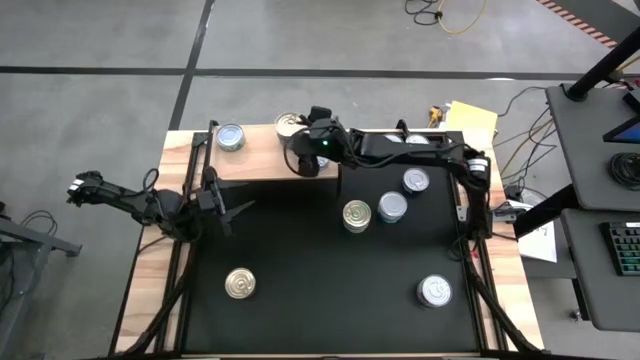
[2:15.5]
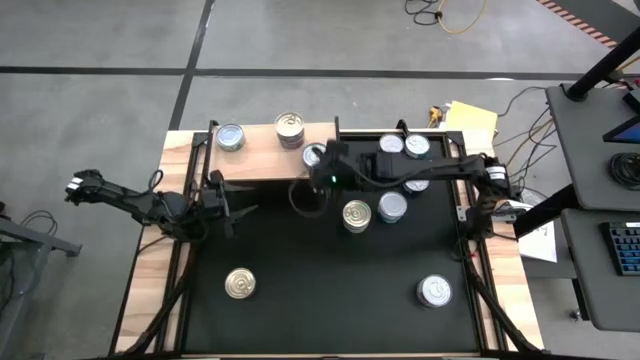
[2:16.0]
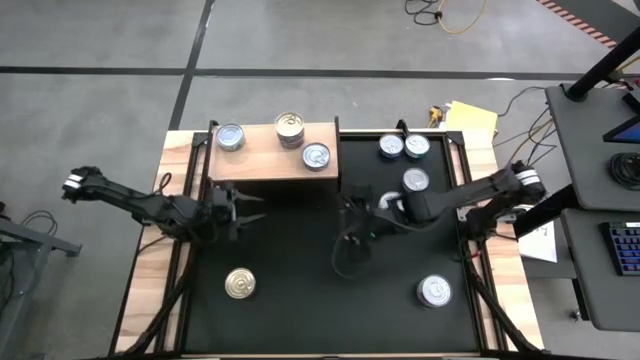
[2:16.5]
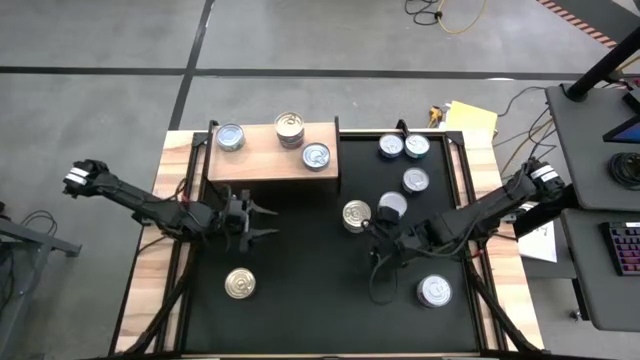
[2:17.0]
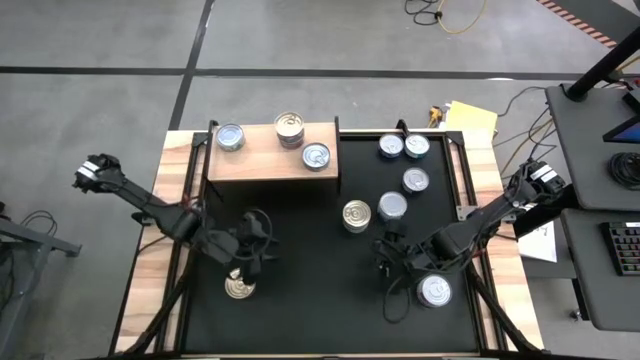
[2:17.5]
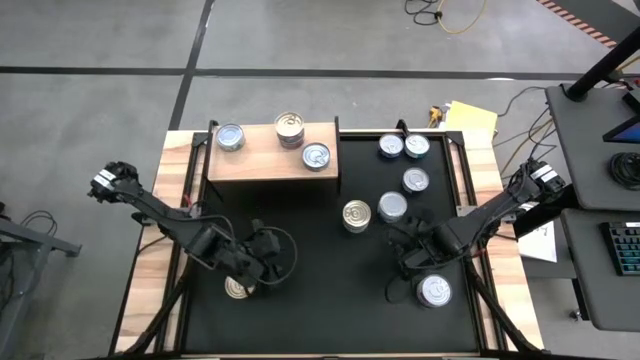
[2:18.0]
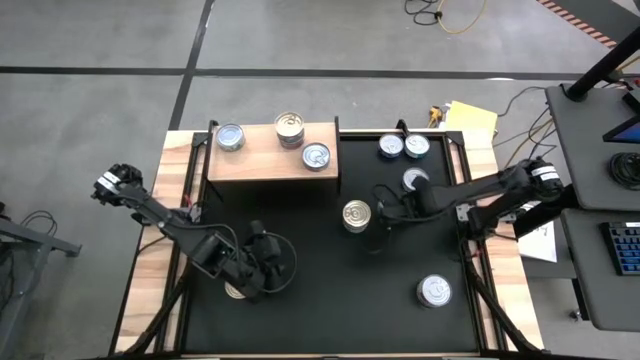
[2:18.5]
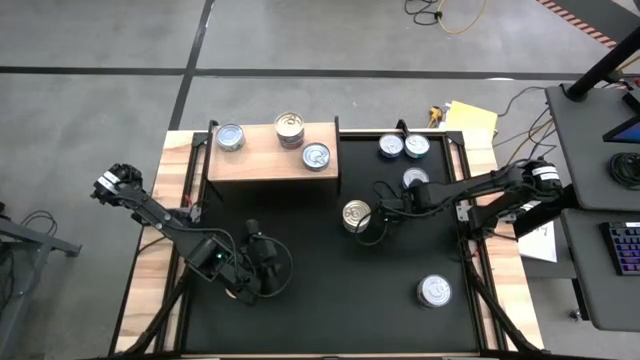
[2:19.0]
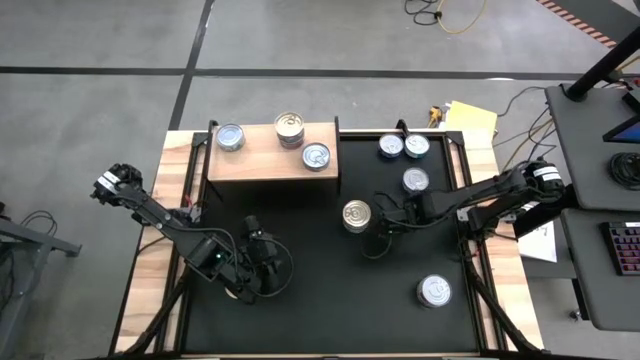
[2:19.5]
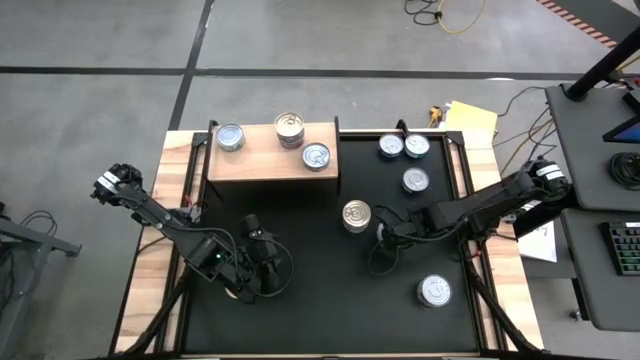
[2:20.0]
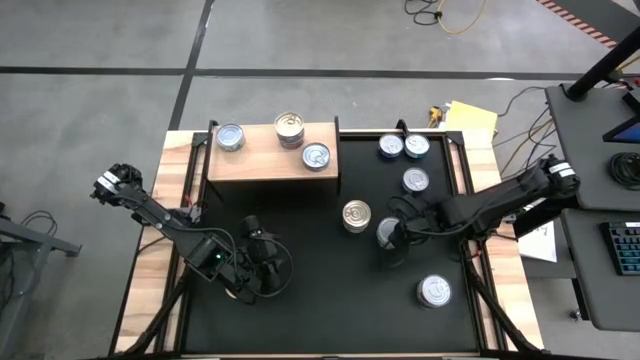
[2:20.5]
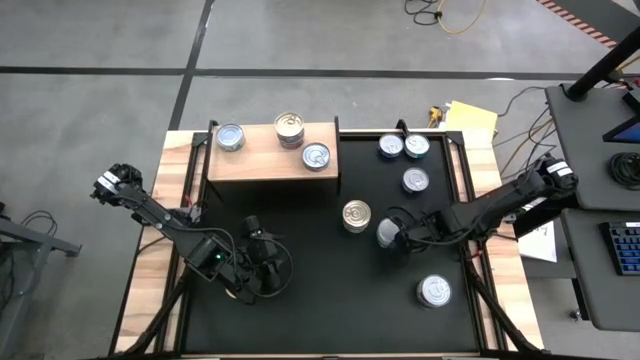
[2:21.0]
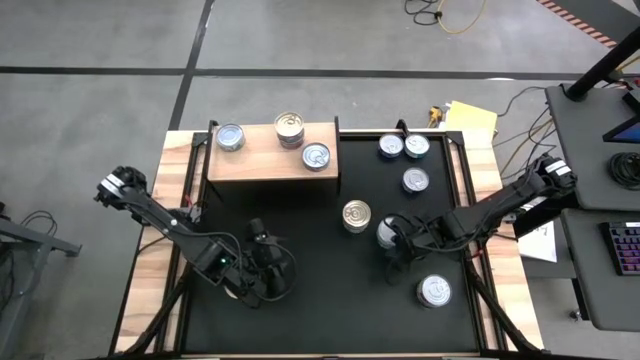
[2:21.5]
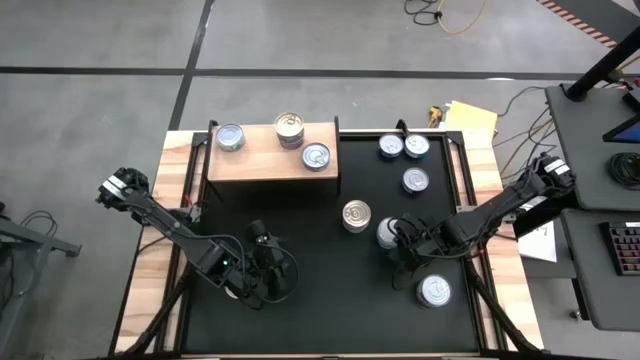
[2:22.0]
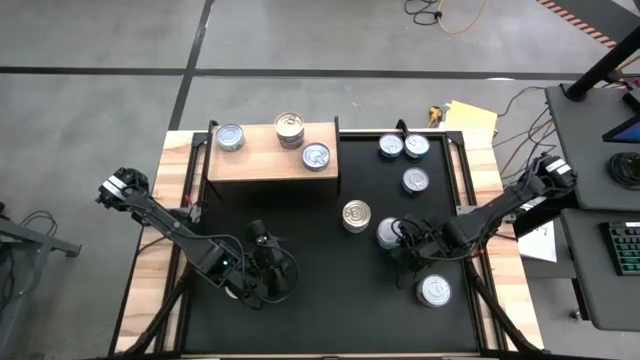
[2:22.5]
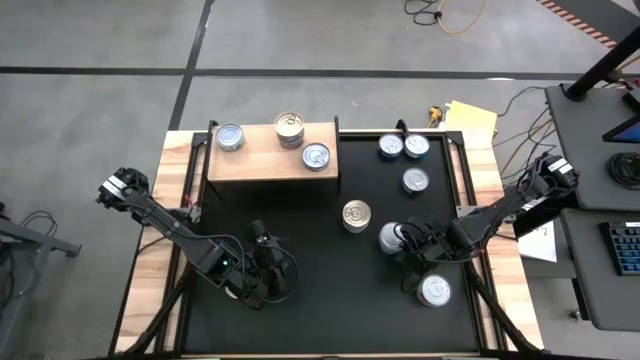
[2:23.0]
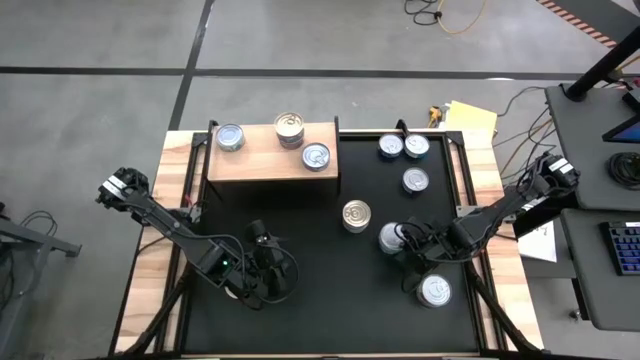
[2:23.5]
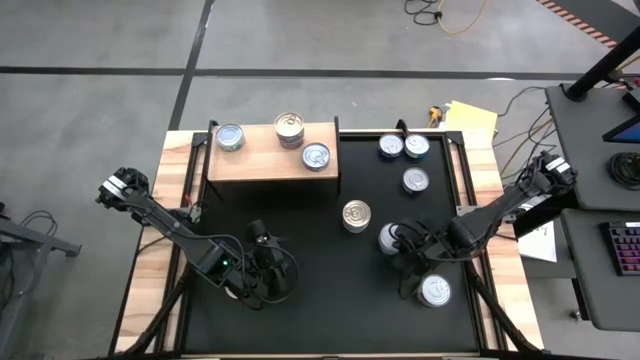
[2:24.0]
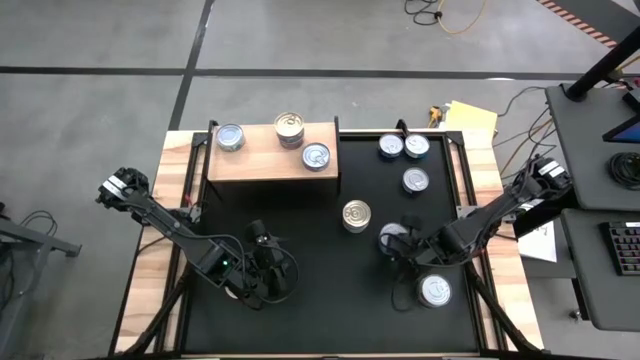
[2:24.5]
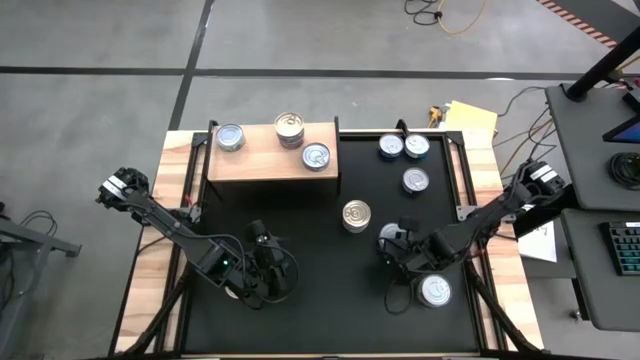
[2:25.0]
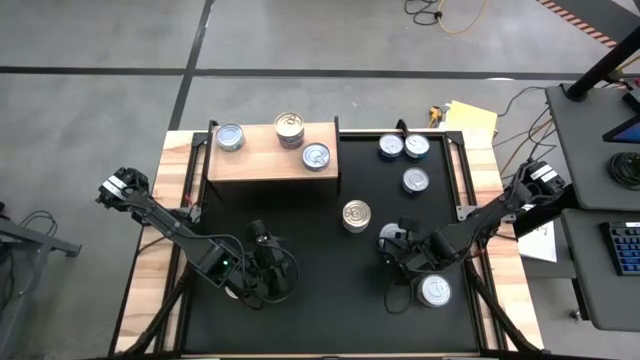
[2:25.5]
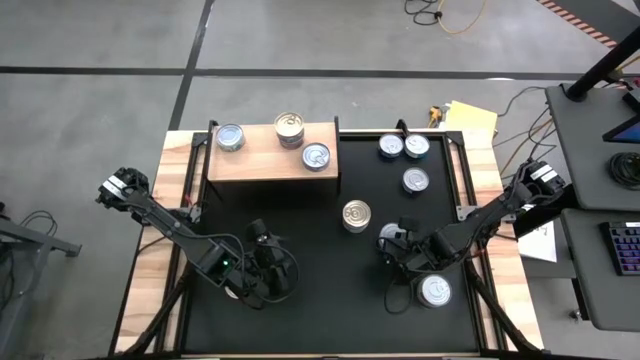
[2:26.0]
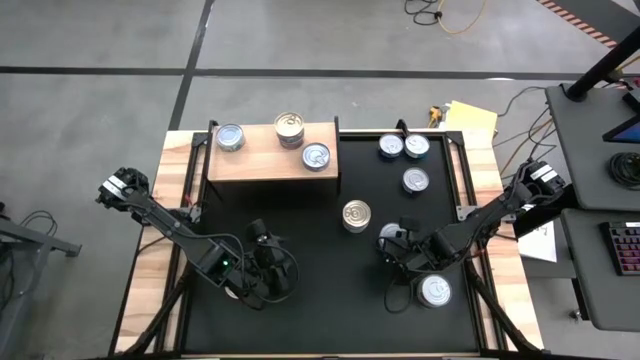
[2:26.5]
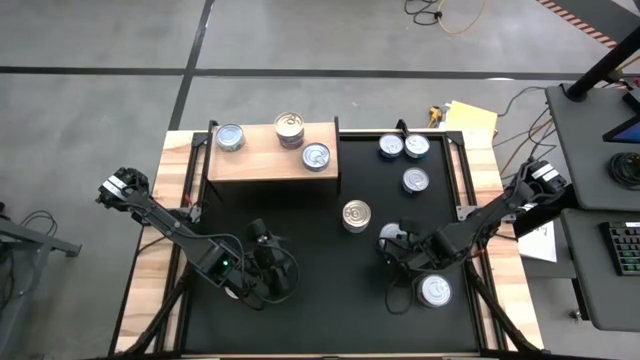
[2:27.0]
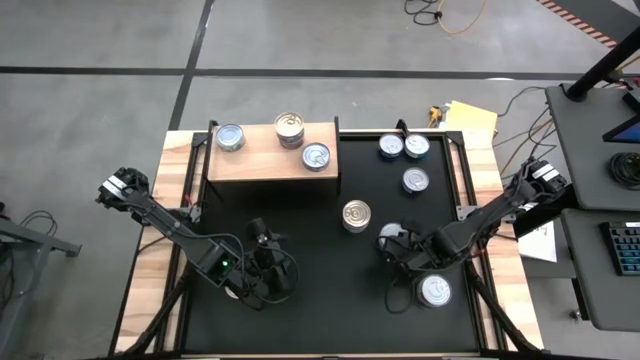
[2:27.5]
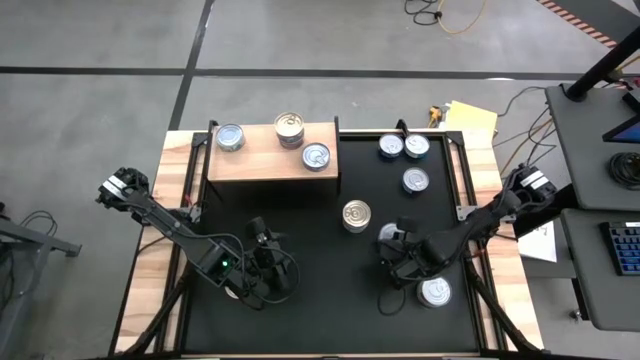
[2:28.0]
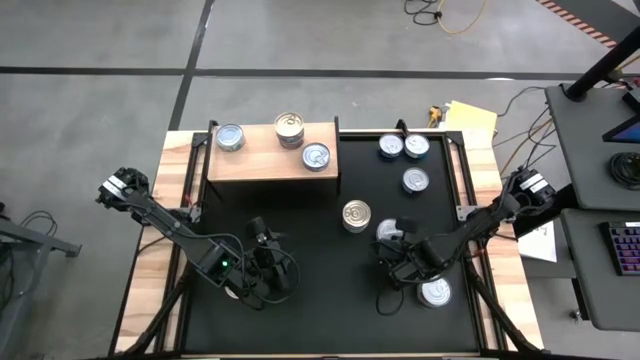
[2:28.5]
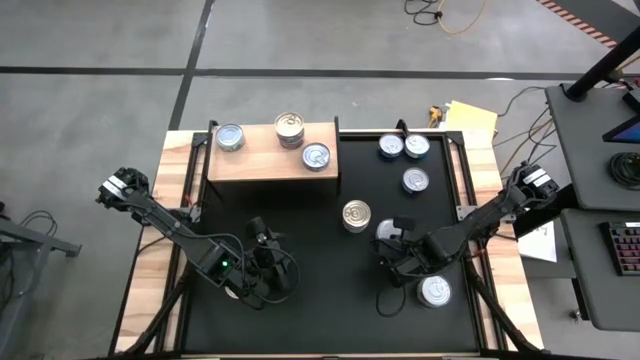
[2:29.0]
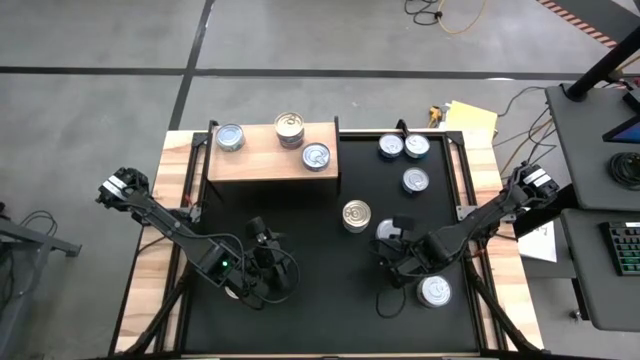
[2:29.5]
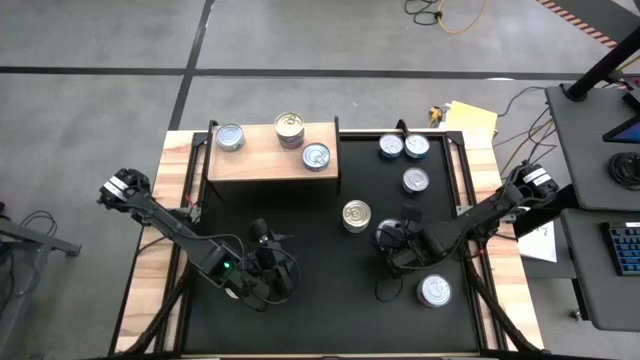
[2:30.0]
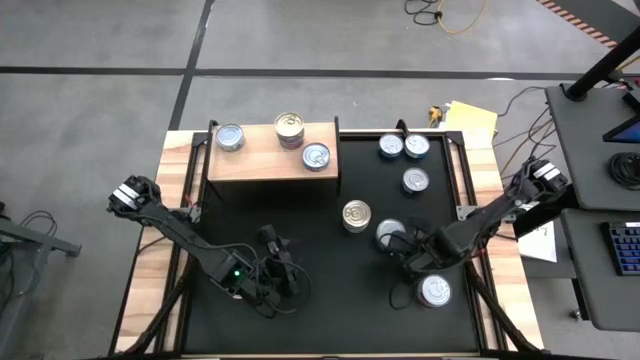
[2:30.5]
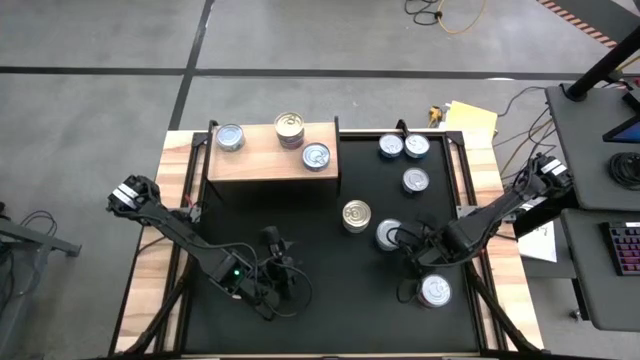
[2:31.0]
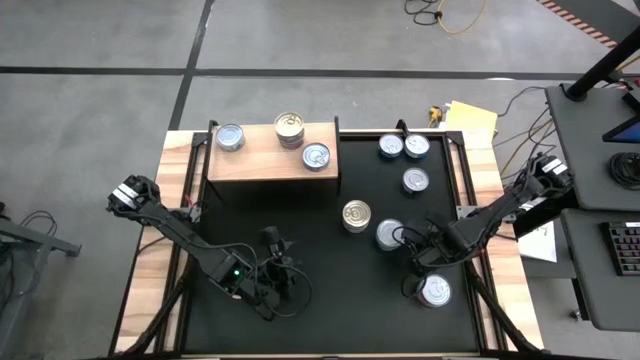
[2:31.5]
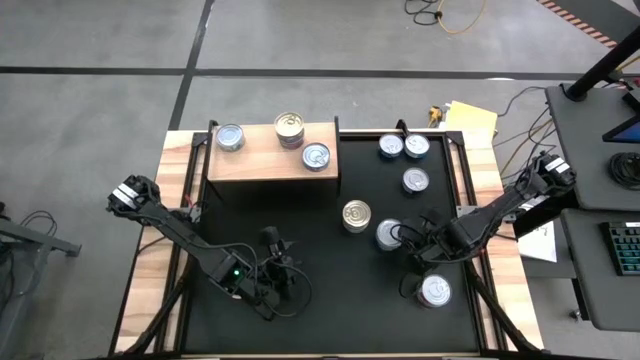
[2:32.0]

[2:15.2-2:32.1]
Task: Stack canned seafood by type on shelf
Stack the green/white tuna can on top of the other green/white tuna can on the shelf

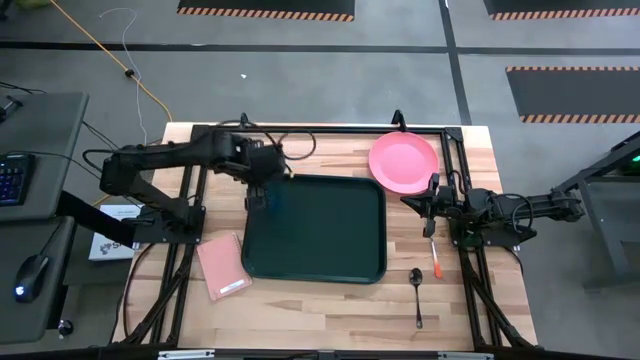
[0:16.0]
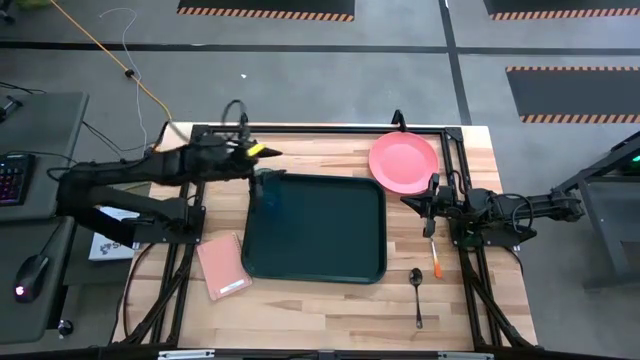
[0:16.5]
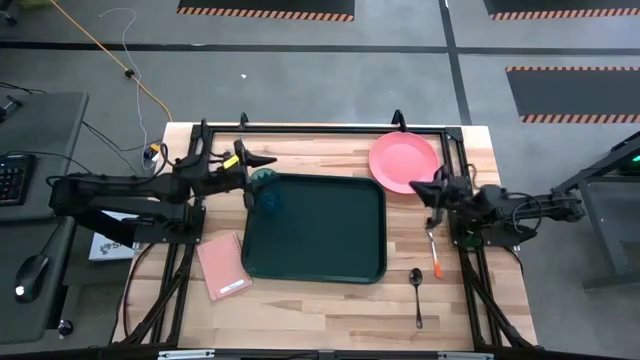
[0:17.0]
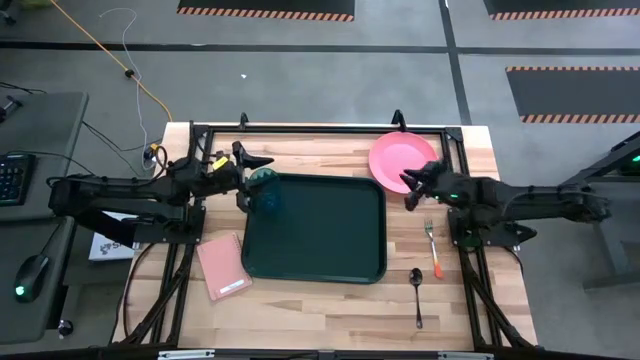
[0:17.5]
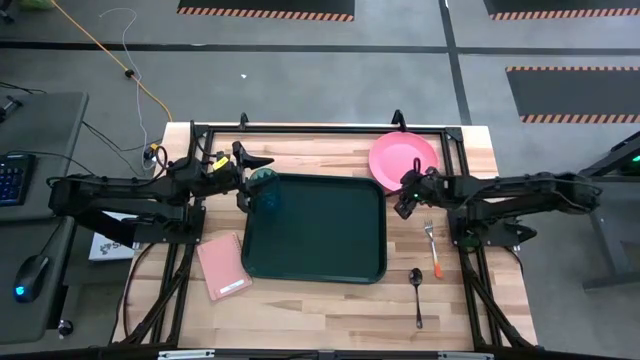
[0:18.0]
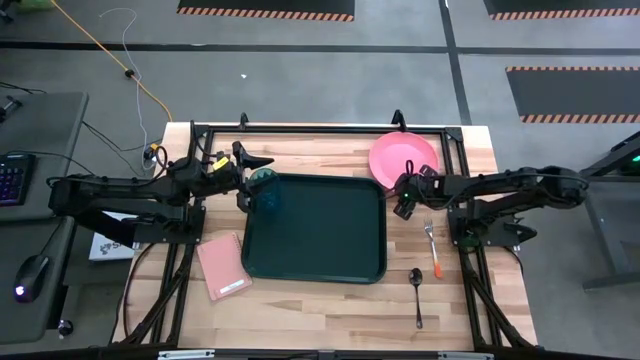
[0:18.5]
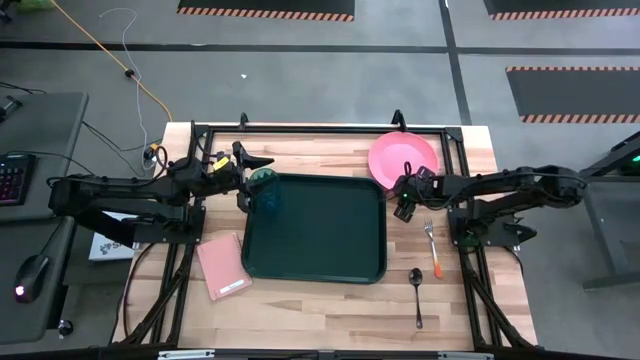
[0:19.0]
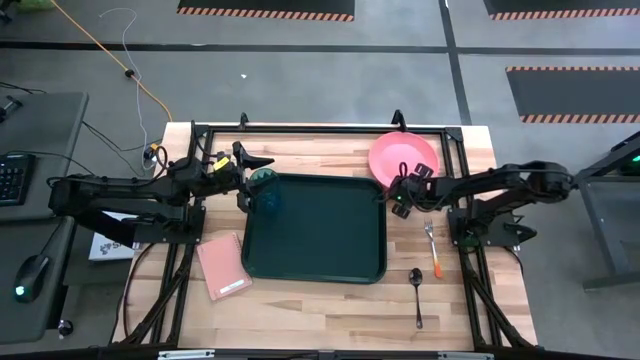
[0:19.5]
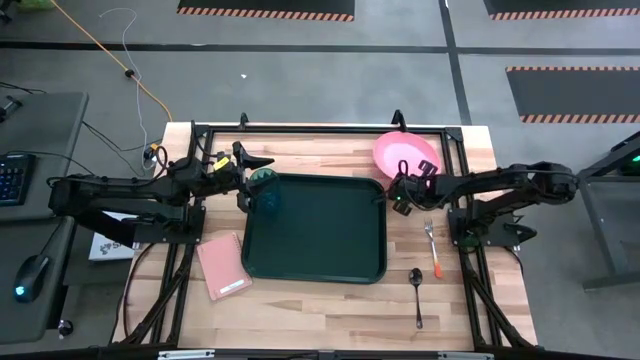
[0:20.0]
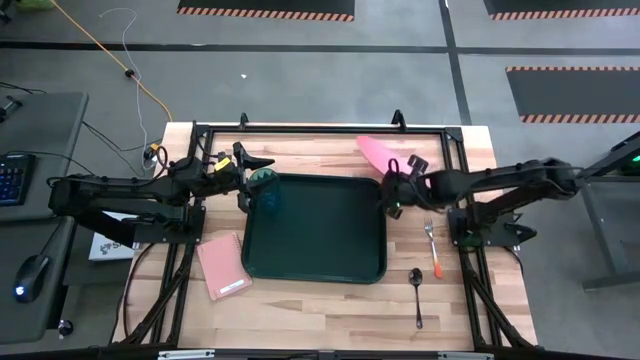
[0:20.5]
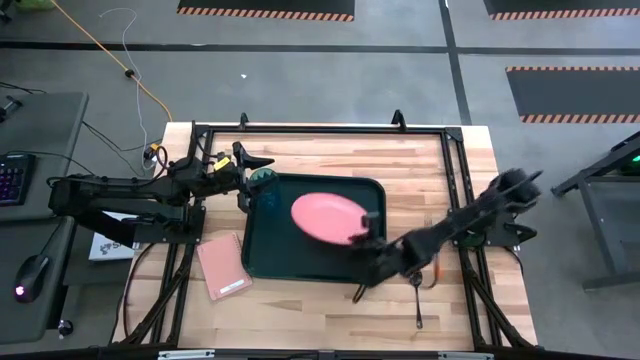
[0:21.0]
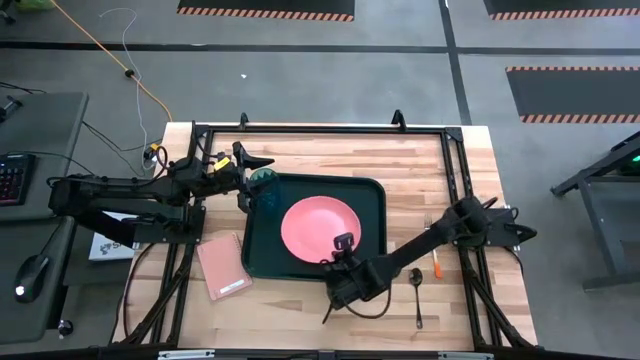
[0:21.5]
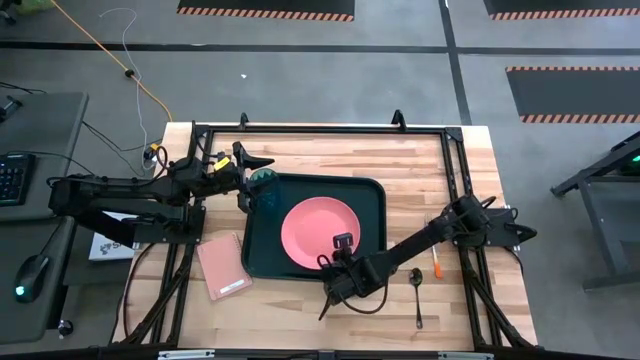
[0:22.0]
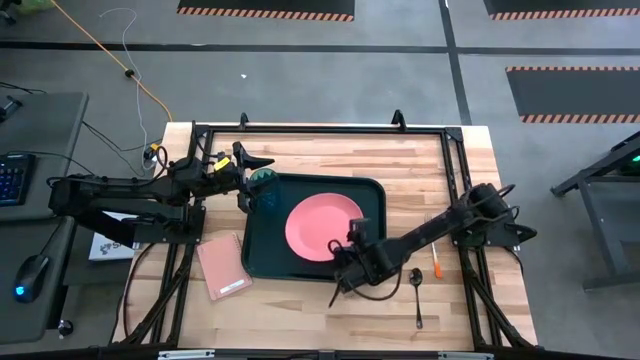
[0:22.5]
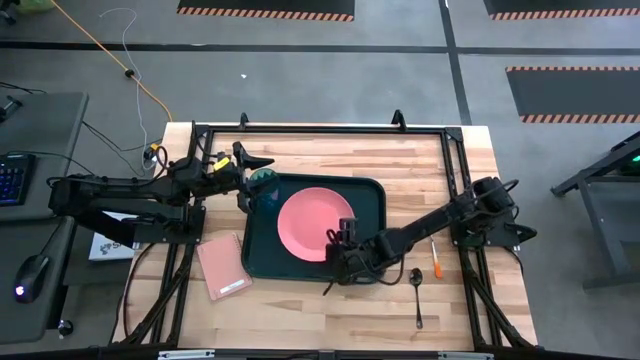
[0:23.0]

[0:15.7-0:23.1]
Task: Pick and place plate/cup/fork/spoon on tray
Put the pink plate on the black tray to the right side of the blue cup
